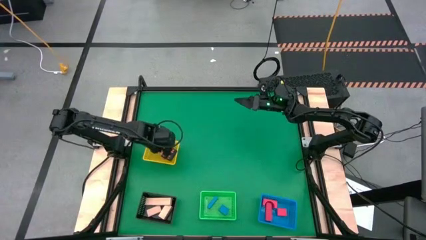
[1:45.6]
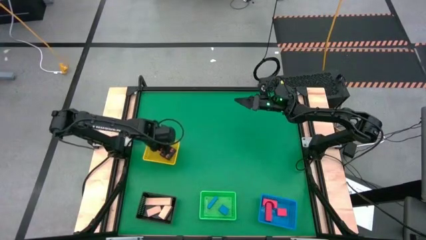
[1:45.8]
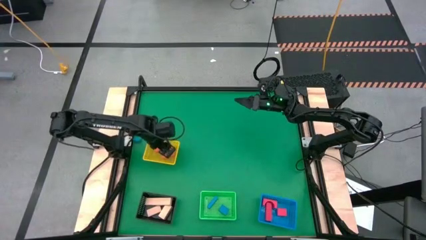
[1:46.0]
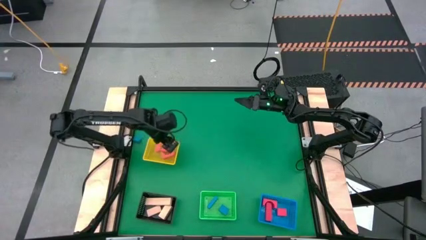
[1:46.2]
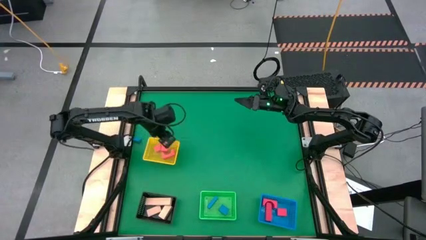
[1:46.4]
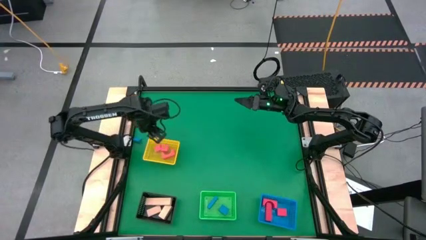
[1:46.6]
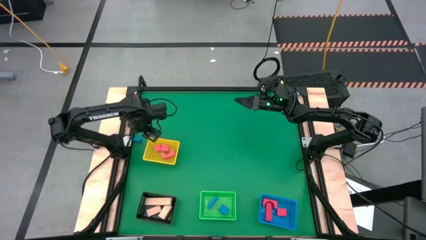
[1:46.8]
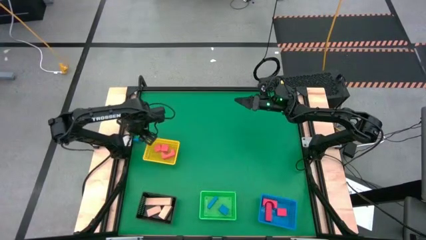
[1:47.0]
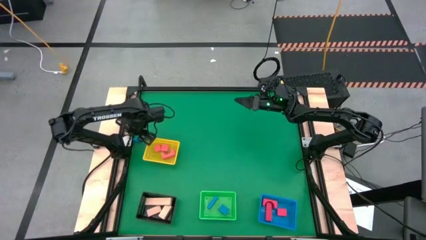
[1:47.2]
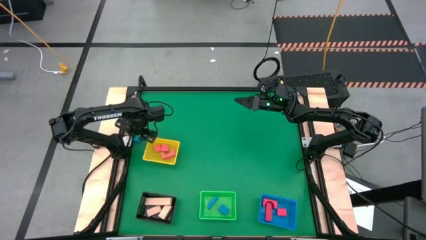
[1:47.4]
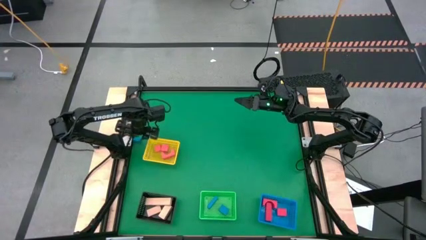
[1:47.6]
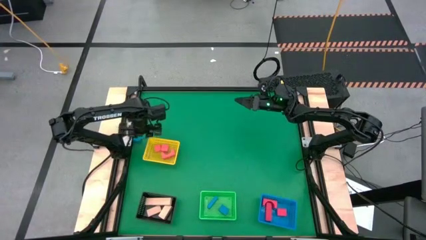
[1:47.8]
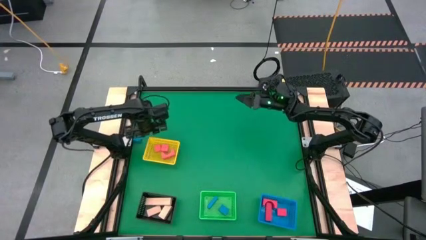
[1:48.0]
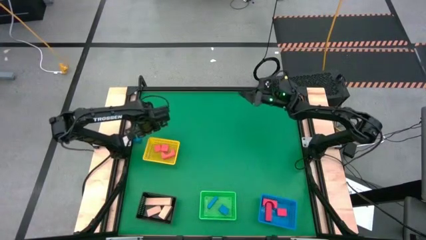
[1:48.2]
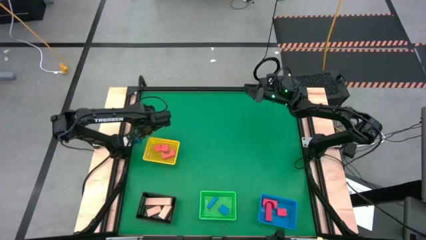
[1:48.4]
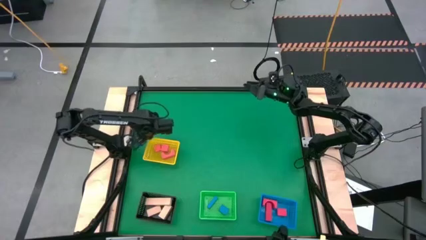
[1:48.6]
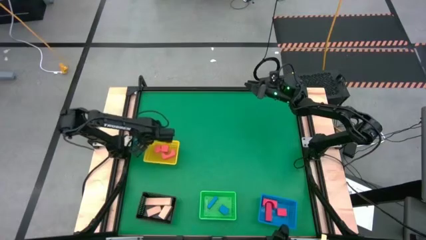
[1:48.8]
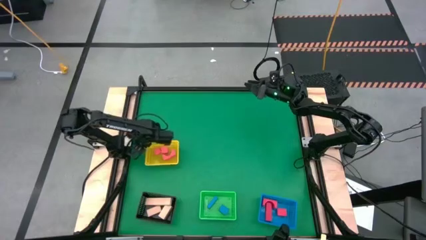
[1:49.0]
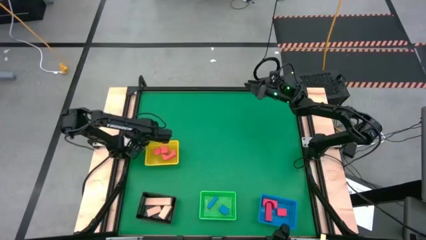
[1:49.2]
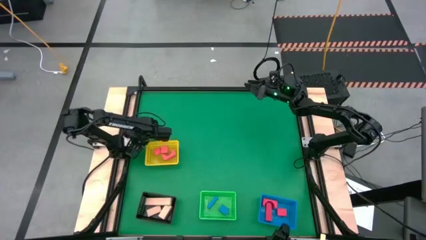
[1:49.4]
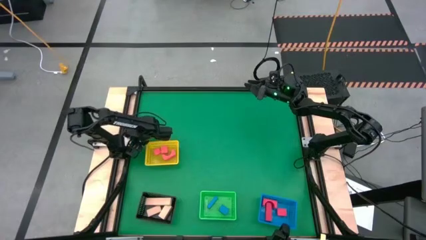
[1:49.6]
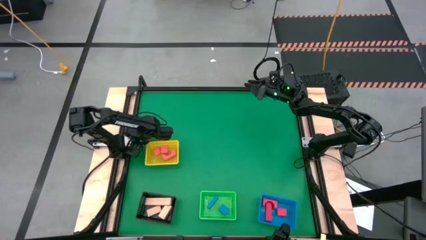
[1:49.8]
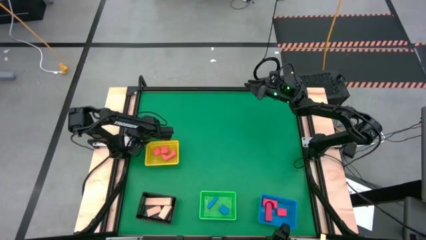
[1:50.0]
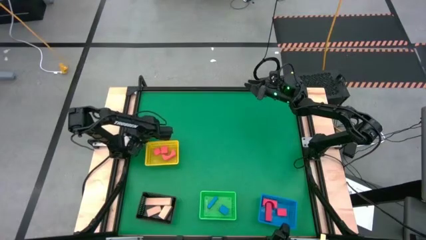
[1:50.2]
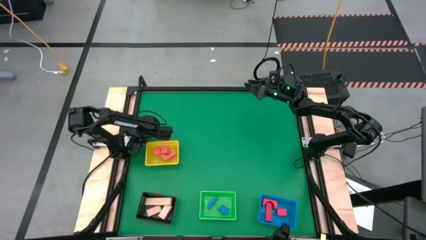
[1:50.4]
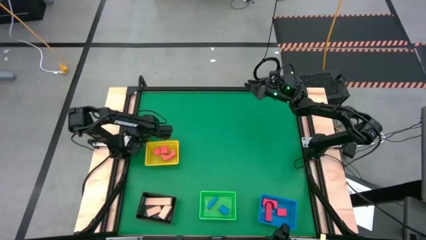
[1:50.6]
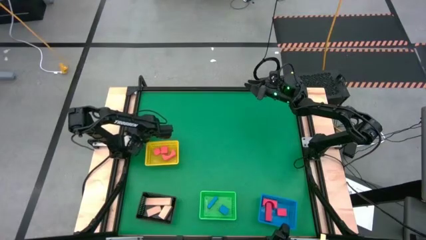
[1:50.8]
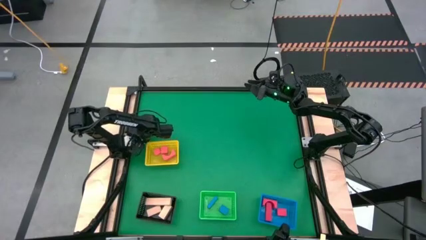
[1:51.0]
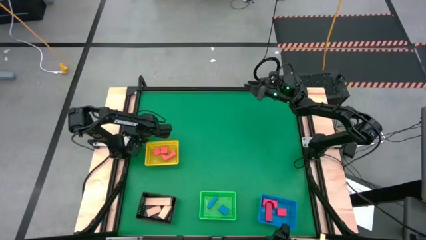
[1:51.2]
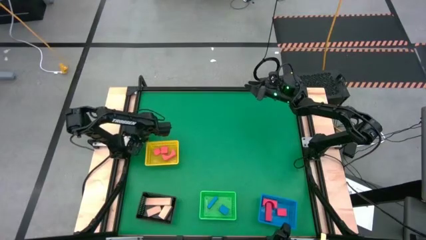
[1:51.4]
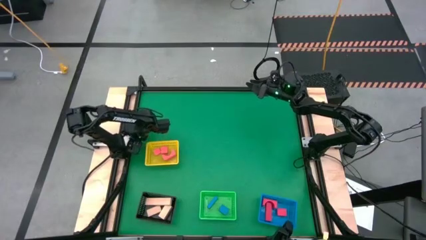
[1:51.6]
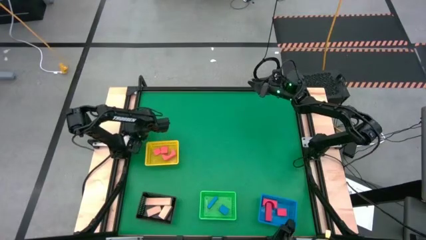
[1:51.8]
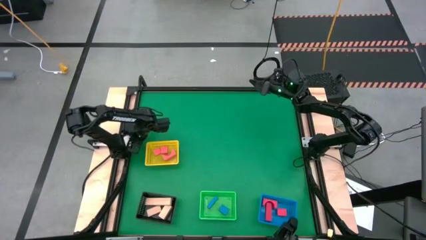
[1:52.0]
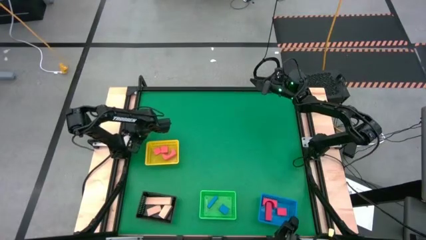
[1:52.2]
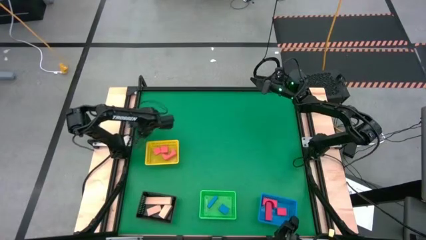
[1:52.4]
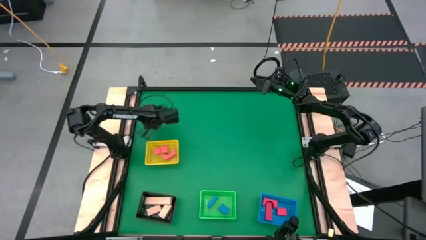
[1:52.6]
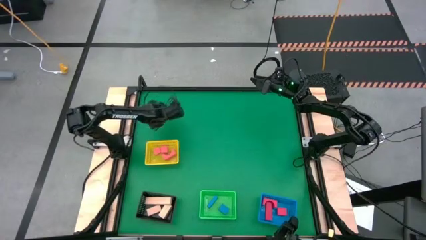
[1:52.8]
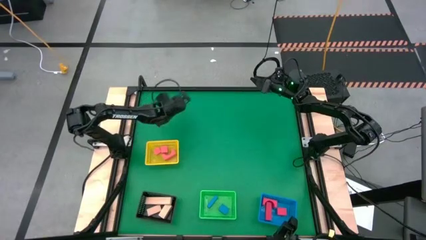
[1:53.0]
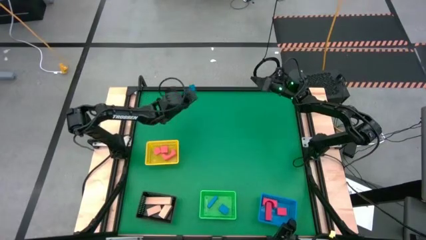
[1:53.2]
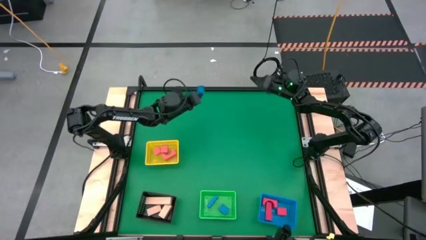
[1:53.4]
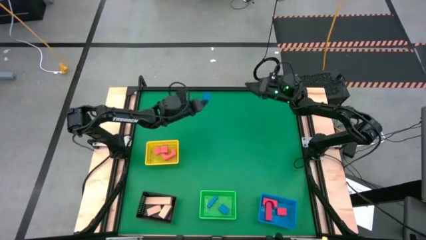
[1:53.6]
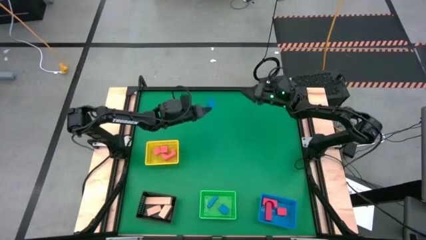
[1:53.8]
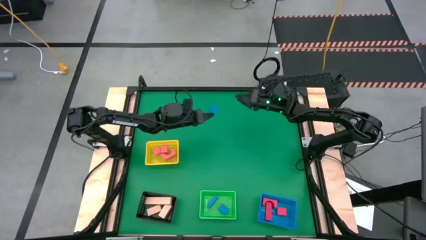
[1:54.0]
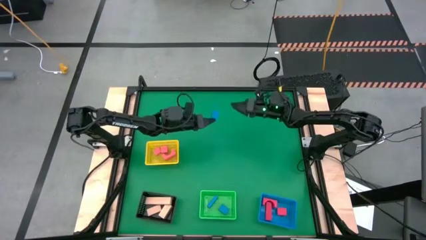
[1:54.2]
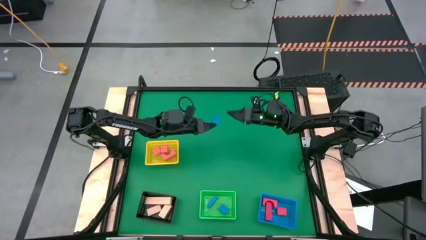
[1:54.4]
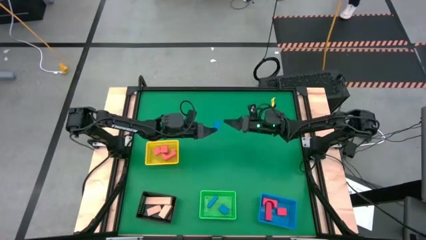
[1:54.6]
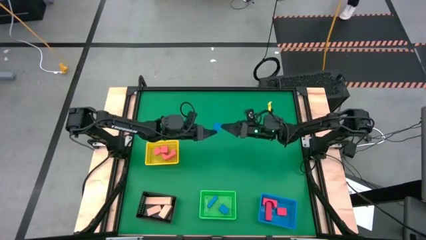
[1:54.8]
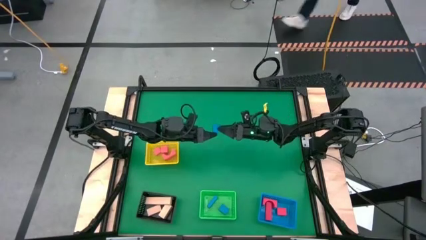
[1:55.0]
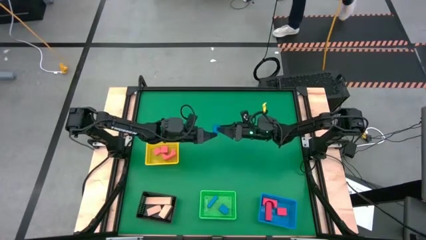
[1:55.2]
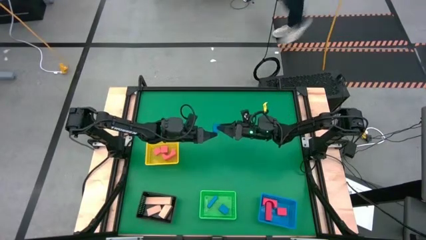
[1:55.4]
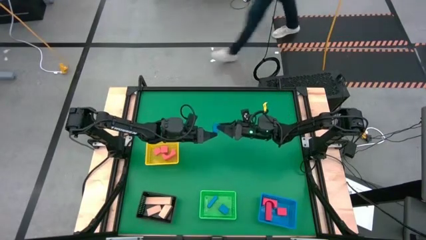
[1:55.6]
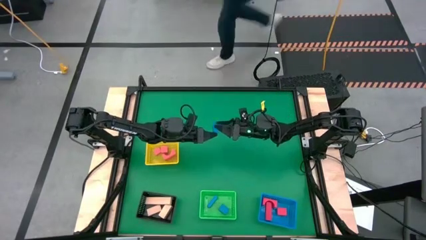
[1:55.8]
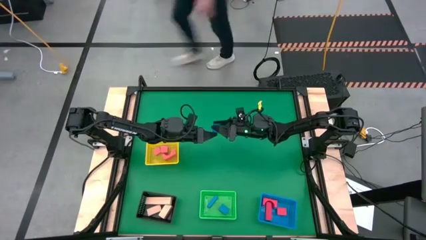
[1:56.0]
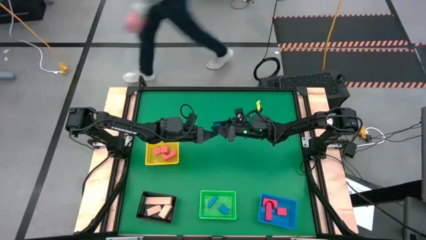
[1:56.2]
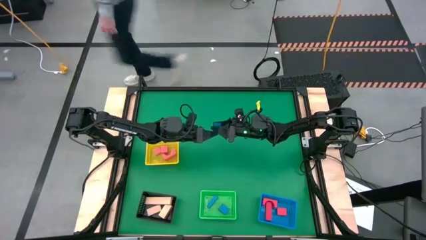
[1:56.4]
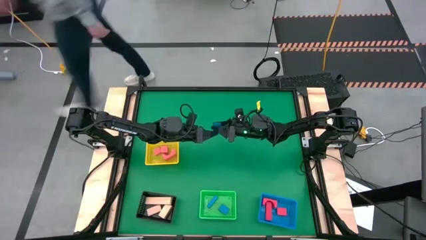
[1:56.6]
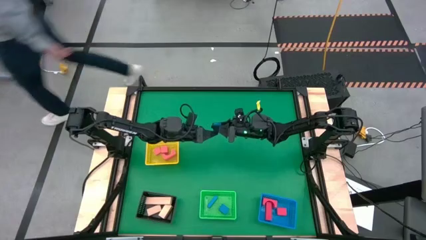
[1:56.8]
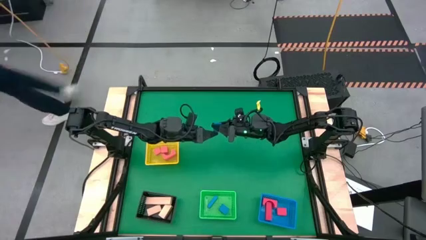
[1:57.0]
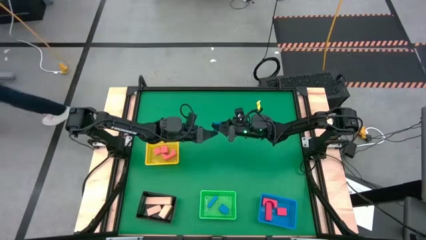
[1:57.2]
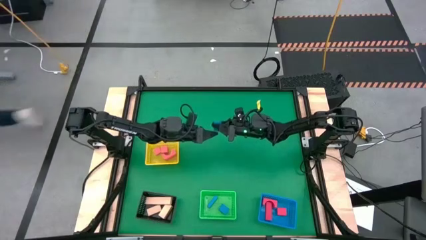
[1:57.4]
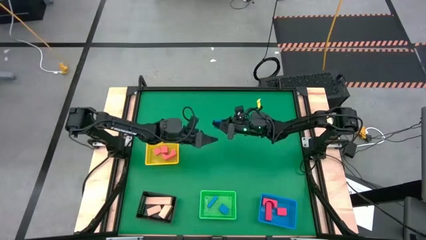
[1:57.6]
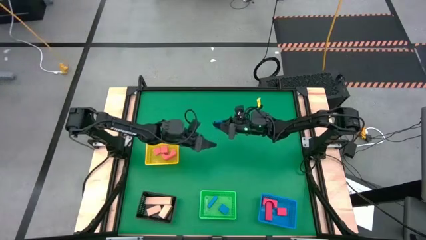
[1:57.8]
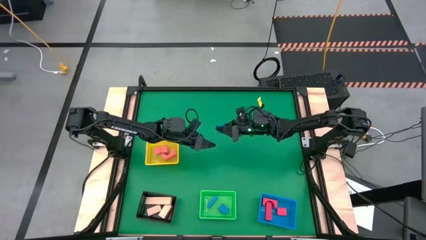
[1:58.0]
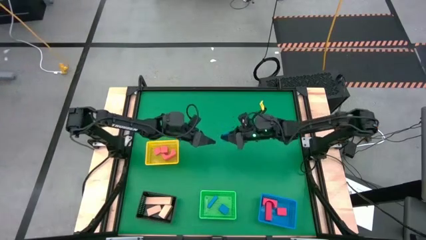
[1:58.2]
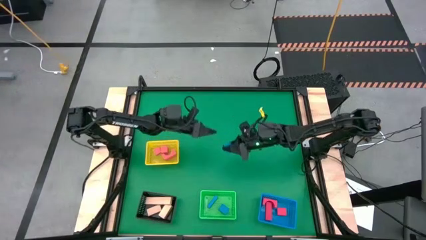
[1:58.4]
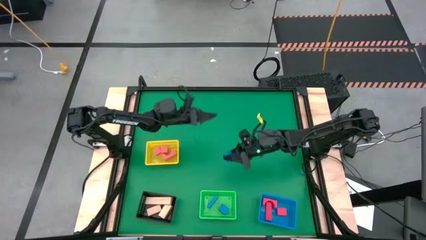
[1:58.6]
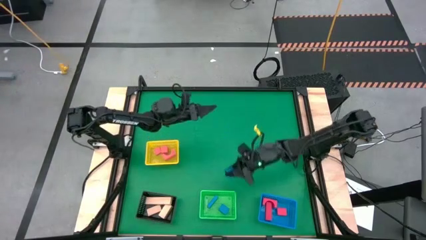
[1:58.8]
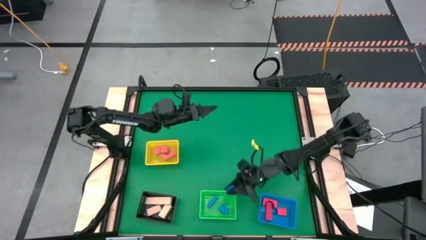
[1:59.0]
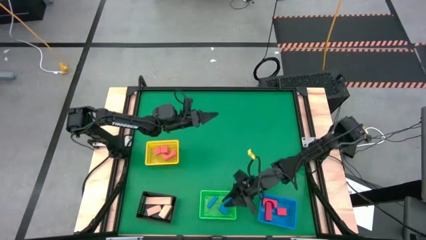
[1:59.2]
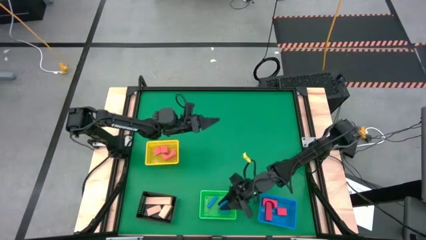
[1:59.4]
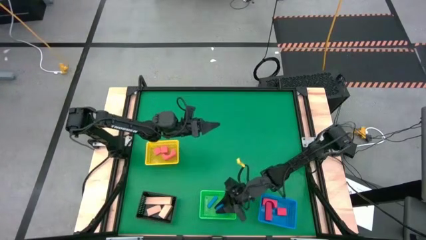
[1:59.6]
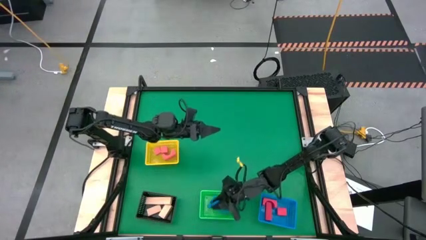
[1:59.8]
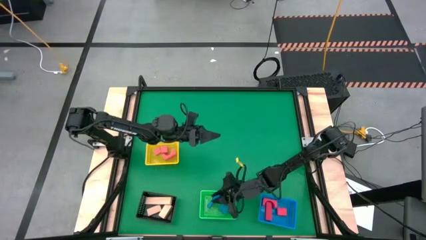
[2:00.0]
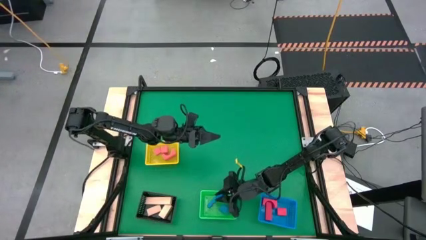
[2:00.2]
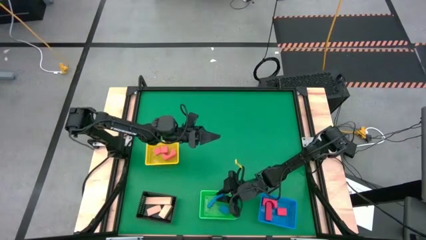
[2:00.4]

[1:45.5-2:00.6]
Task: Sort & place blocks by color
Put the blue triangle block into the green bin

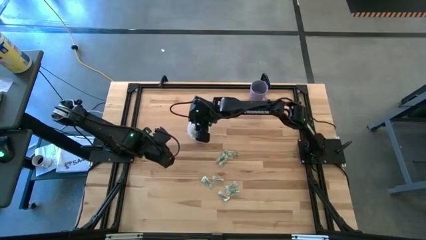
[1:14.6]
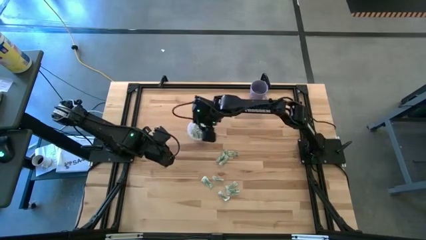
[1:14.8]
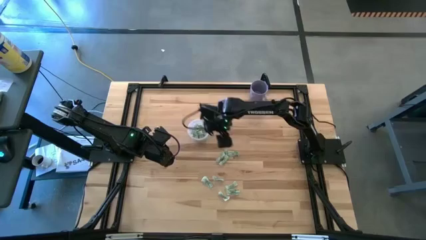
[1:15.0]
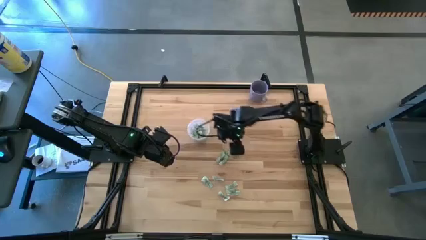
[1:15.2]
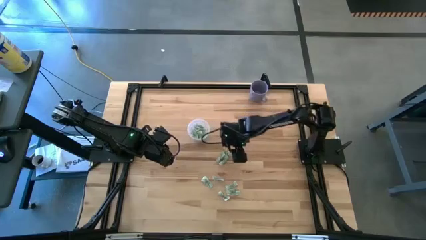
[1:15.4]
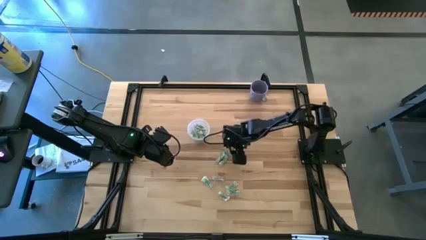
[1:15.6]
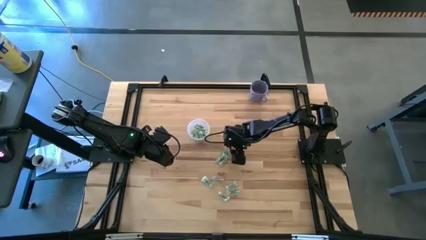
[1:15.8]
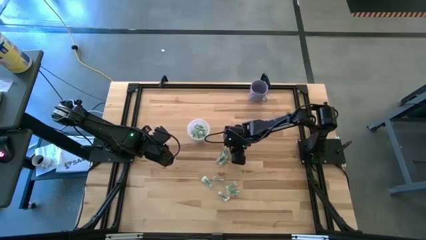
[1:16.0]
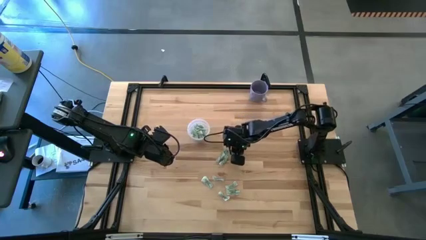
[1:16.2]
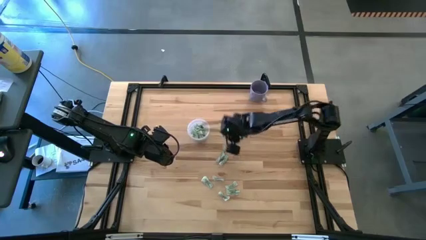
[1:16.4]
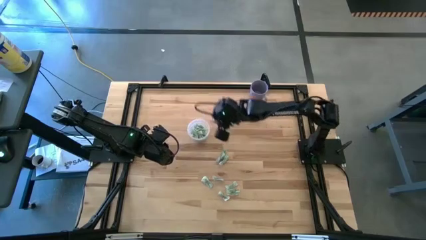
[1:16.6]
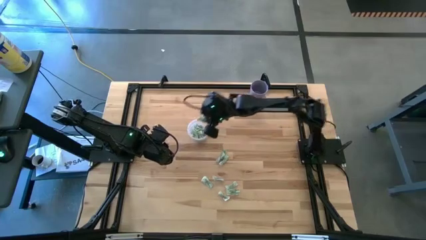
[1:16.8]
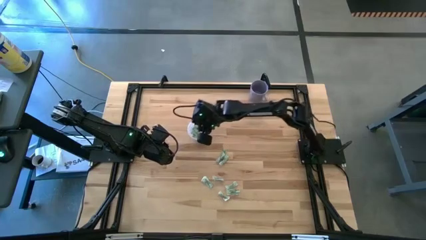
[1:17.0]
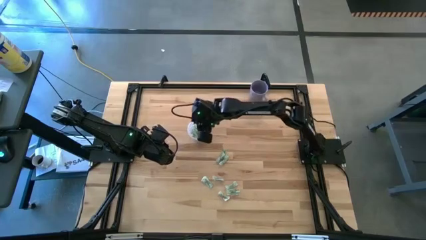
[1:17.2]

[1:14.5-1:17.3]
Task: Pick and place Stevia / Truvia into bins
Put the white stevia packet into the transparent container
